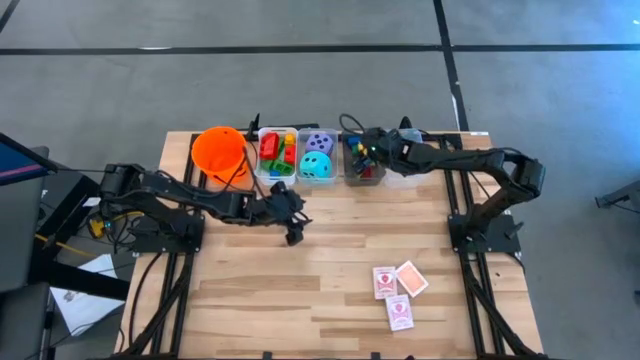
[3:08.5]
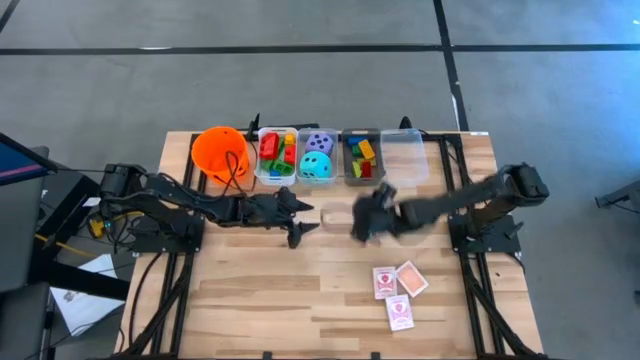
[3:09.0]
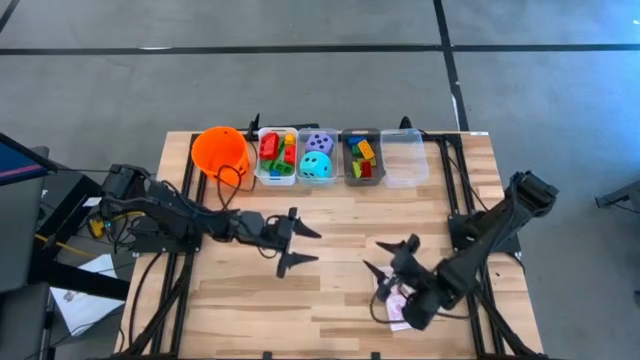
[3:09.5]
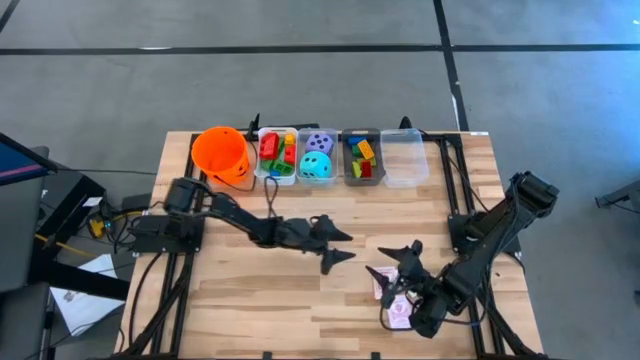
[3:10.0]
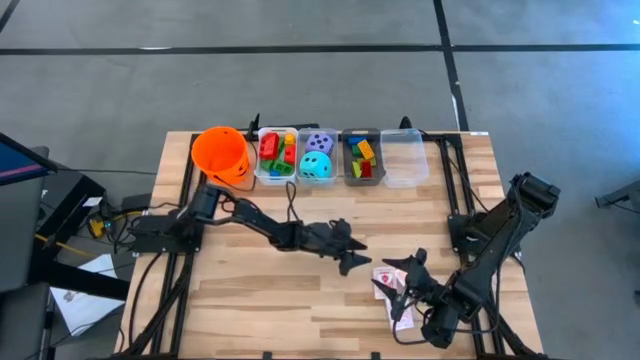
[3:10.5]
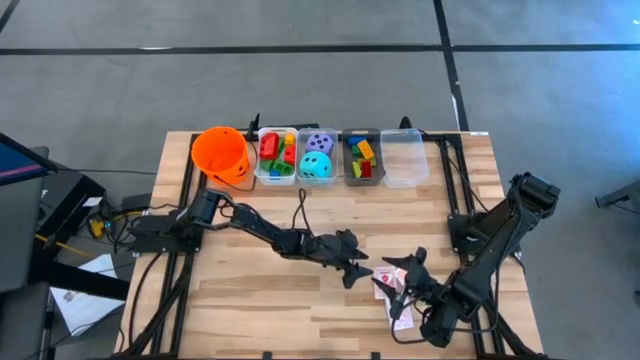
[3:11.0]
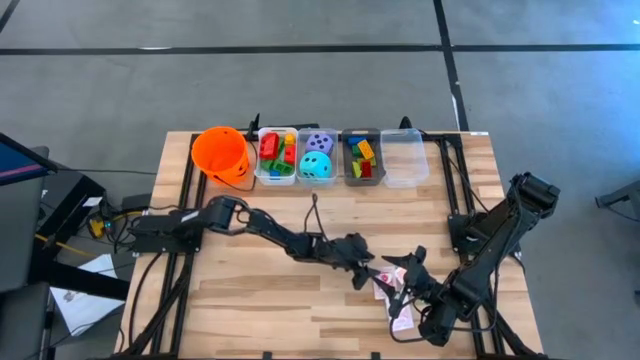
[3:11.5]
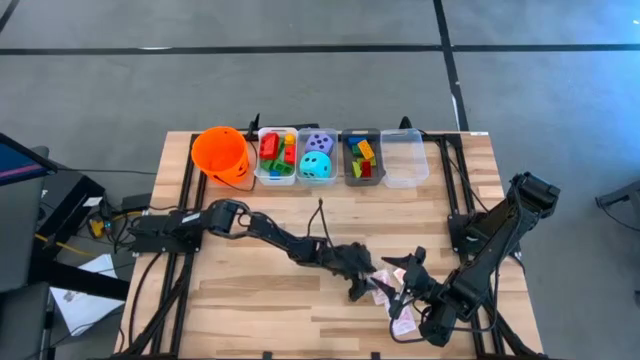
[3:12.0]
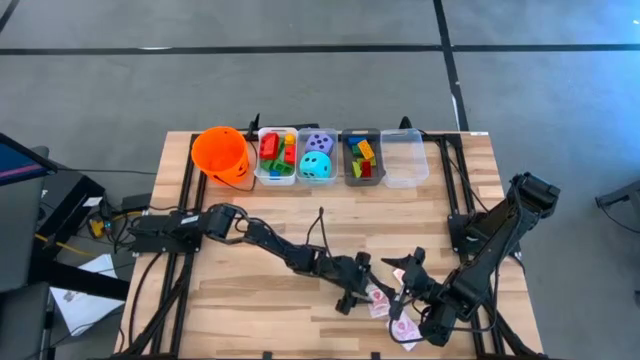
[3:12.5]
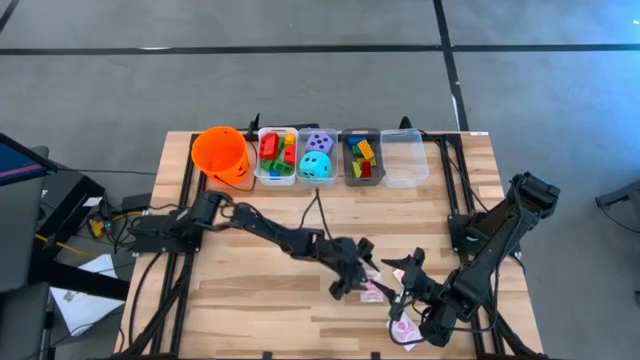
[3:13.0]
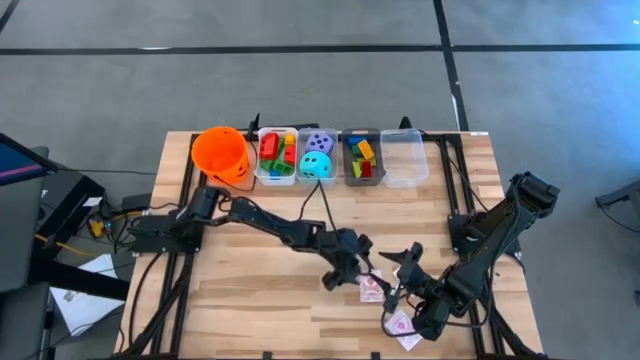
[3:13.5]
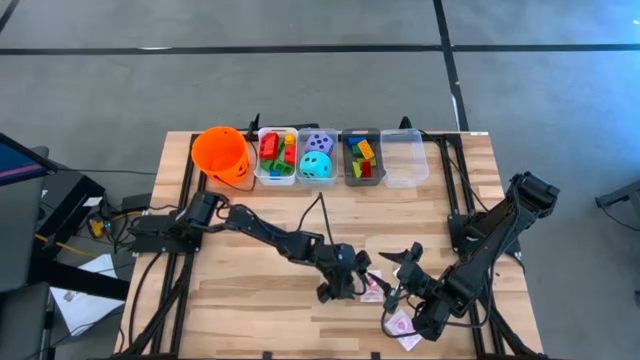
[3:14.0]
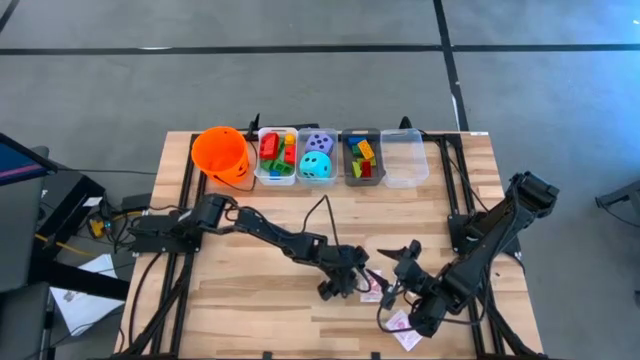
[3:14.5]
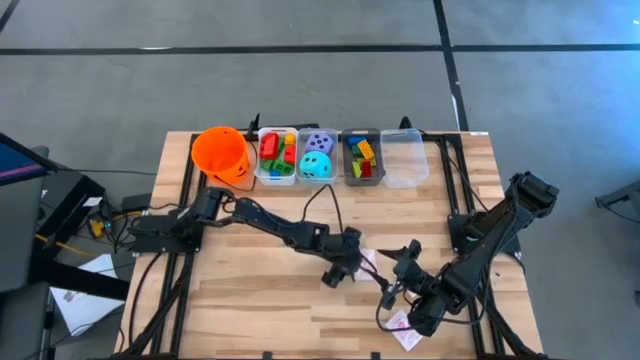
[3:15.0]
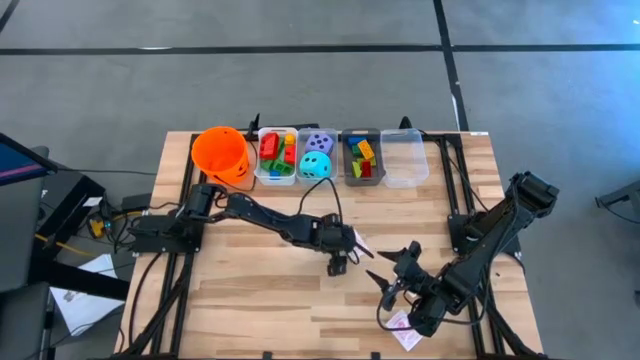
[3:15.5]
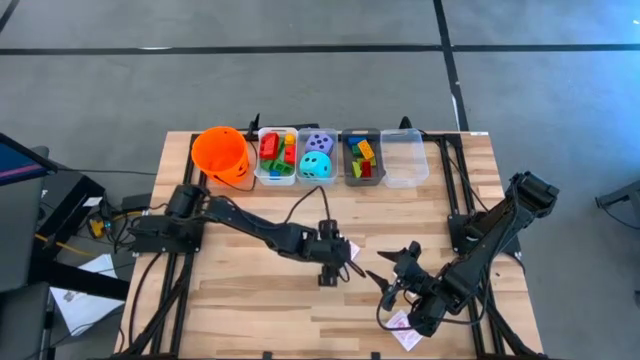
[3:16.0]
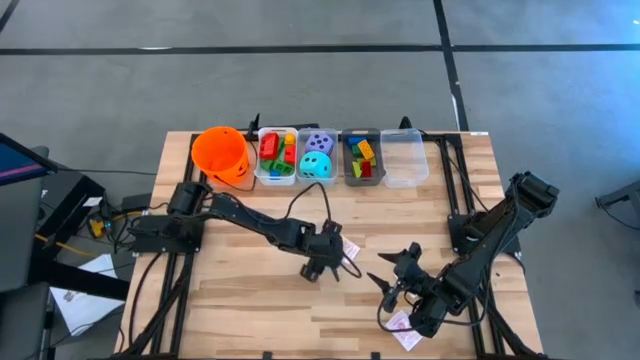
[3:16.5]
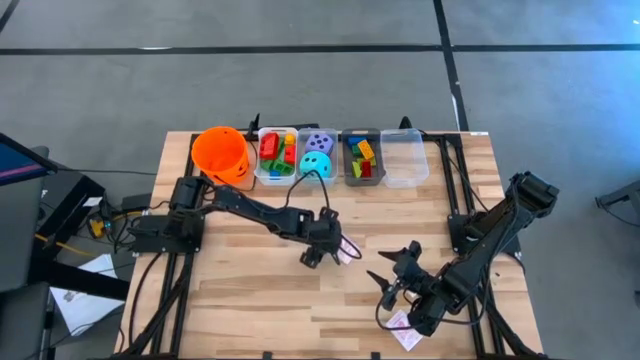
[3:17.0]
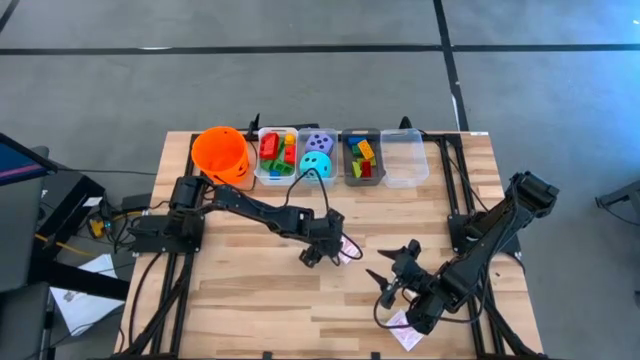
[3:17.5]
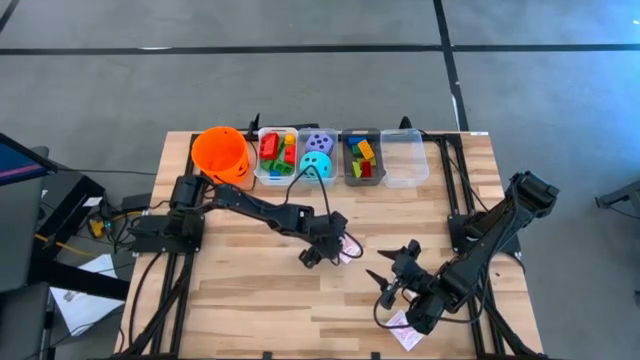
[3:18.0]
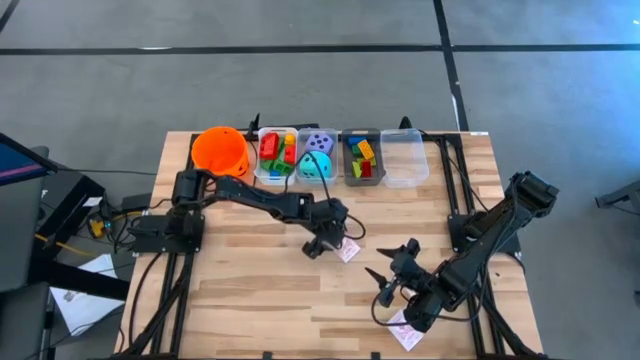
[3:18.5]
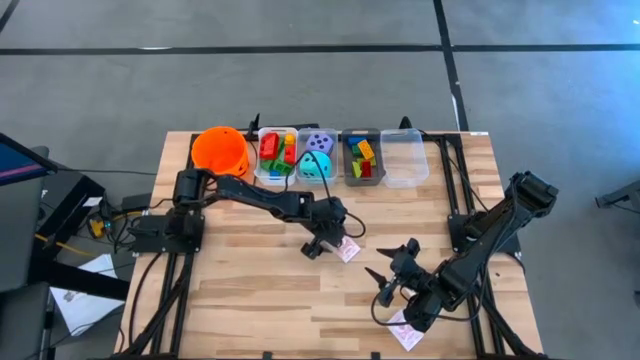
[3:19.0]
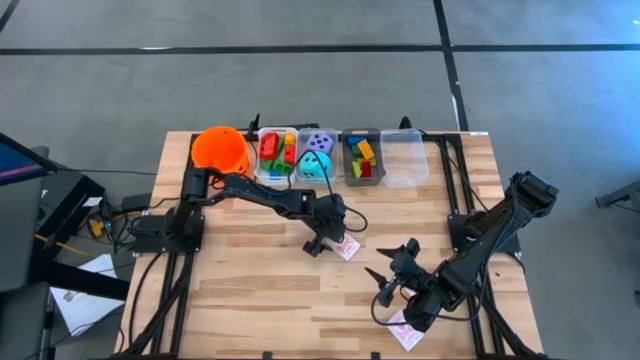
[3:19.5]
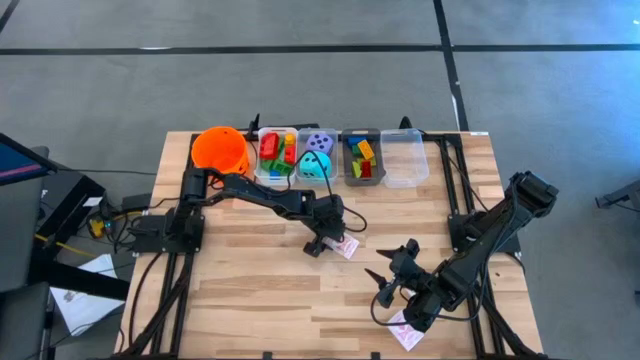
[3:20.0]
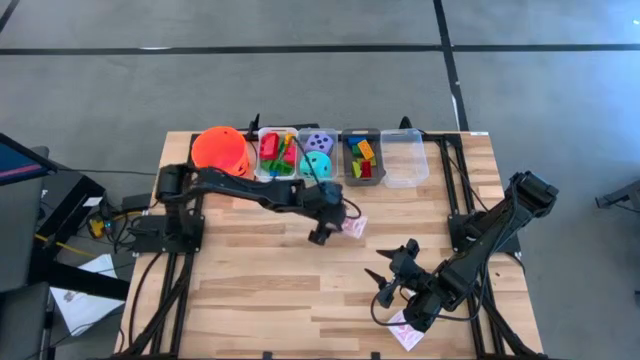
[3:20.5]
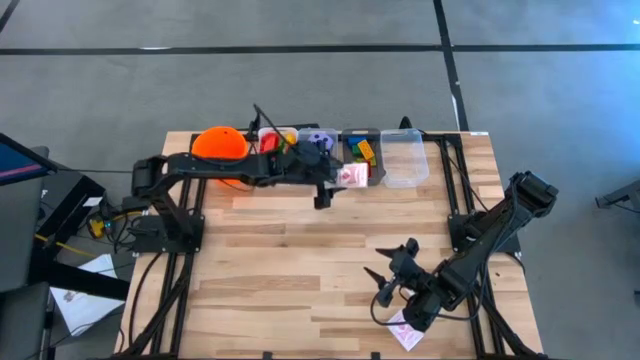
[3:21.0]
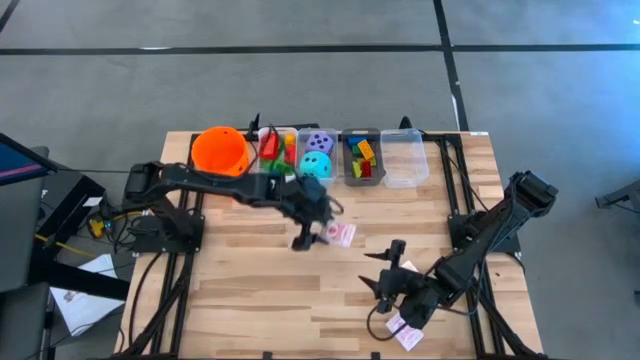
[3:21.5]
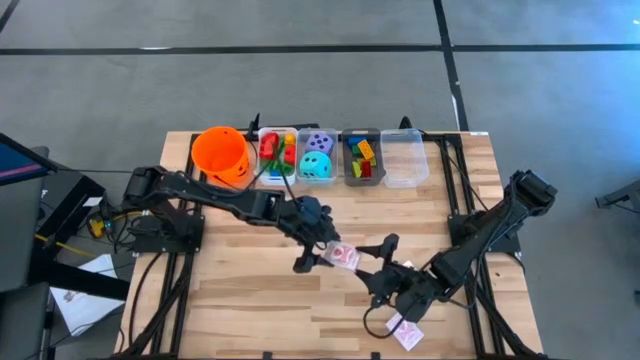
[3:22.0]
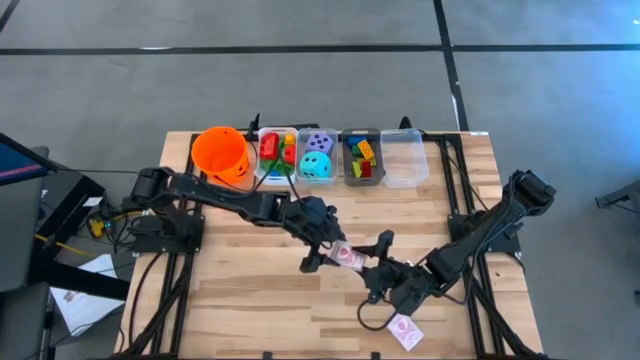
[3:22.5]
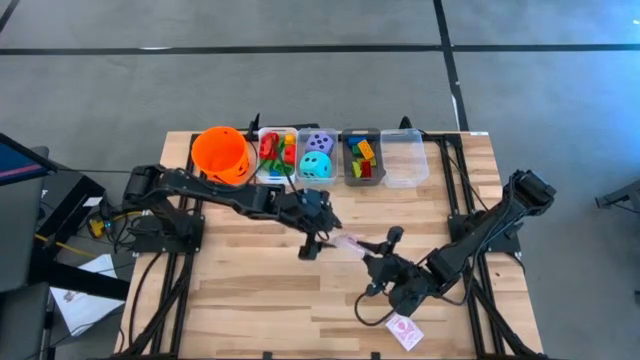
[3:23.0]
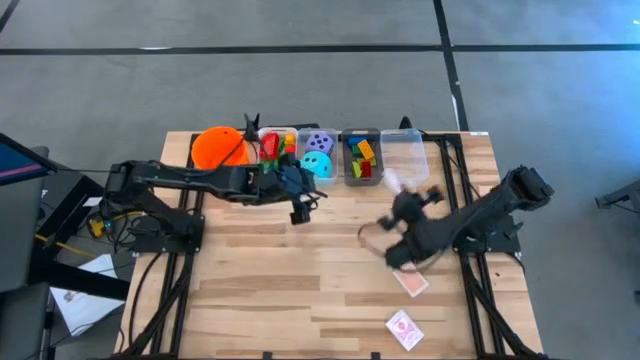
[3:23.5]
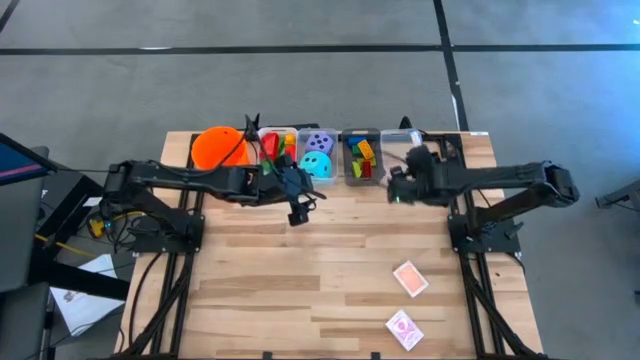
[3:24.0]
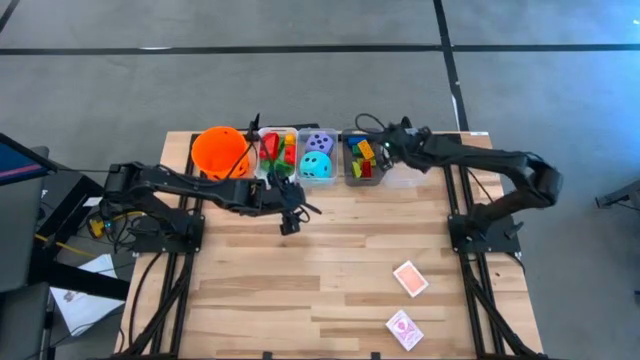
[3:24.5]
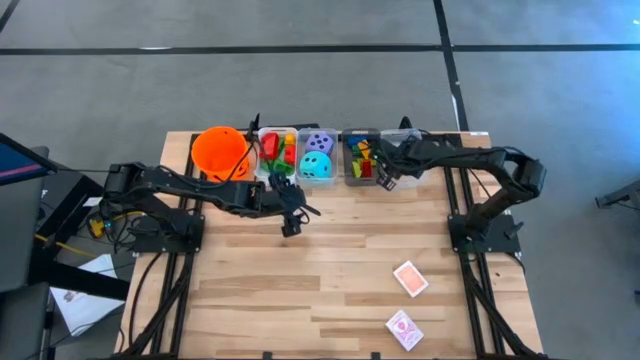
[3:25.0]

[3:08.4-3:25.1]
Task: Pick & Place Toys
Put the top red deck of cards into the right transparent bin

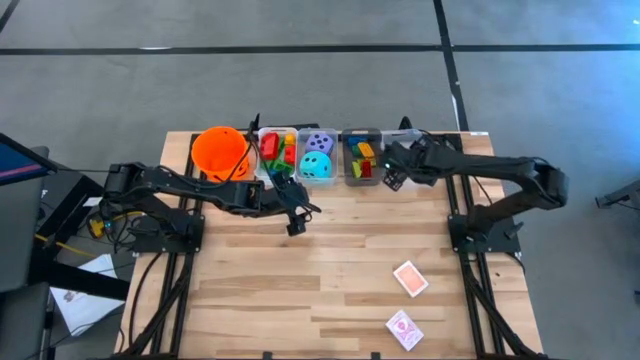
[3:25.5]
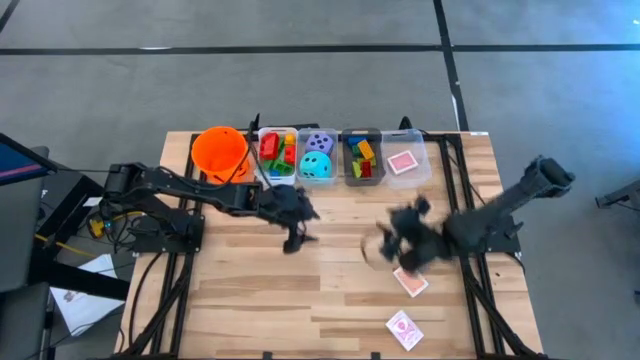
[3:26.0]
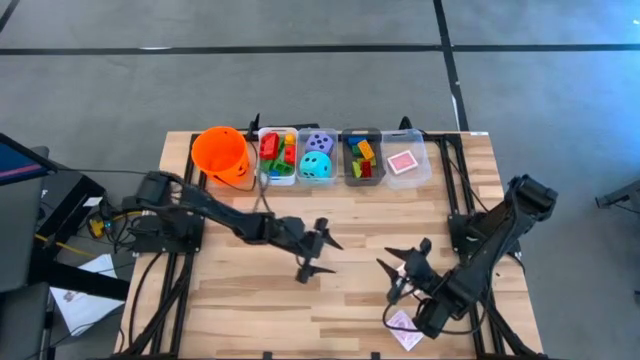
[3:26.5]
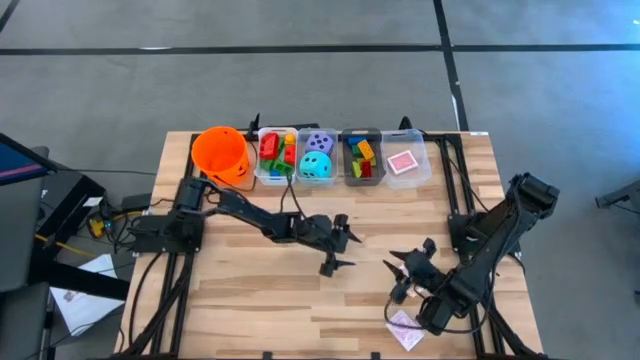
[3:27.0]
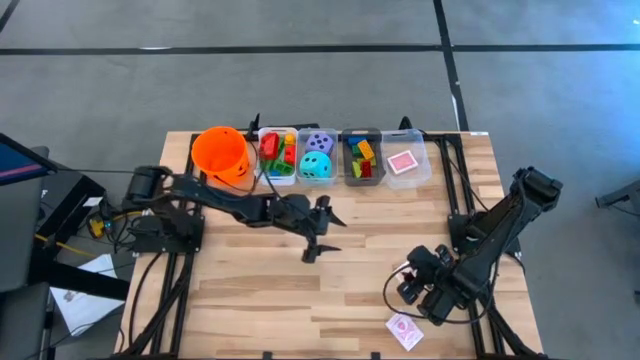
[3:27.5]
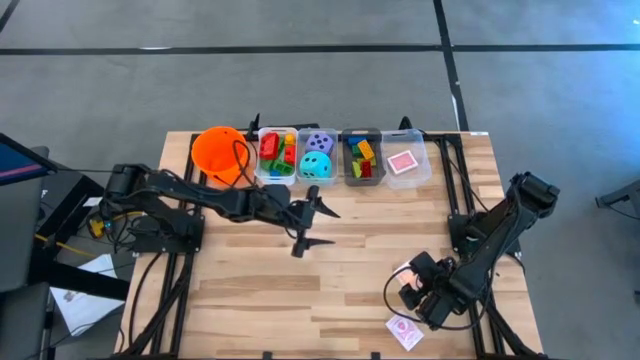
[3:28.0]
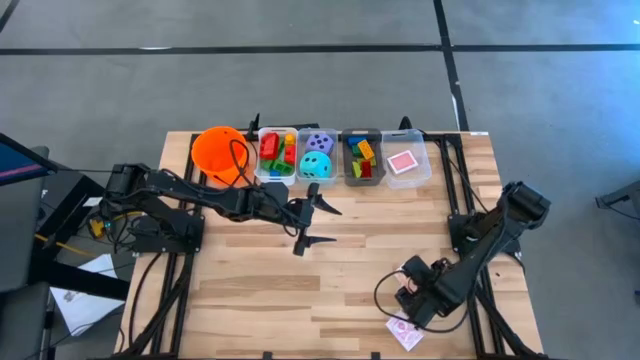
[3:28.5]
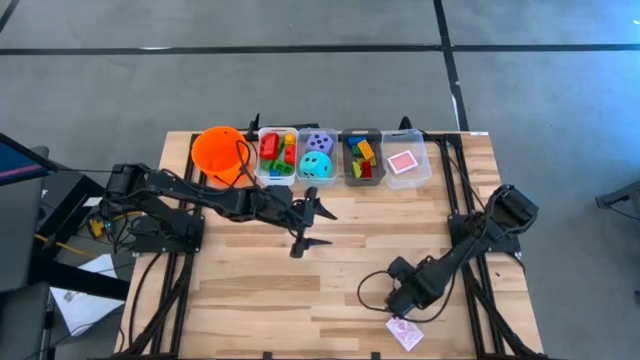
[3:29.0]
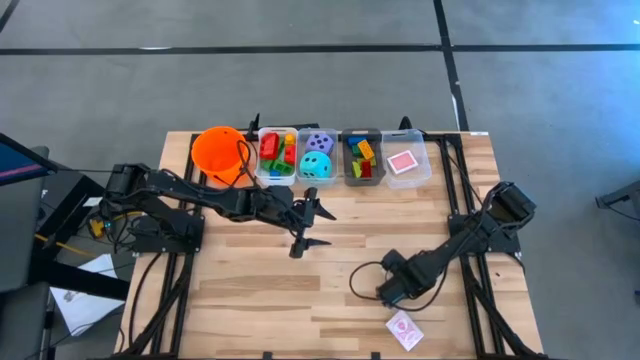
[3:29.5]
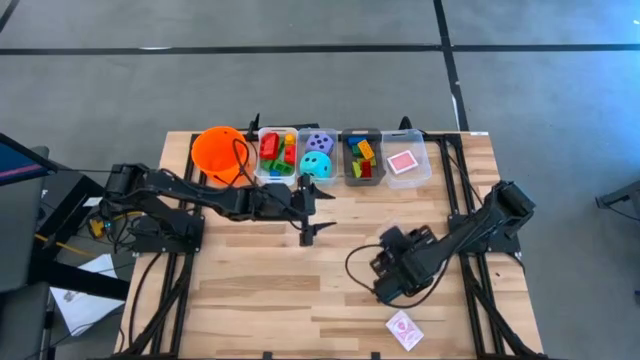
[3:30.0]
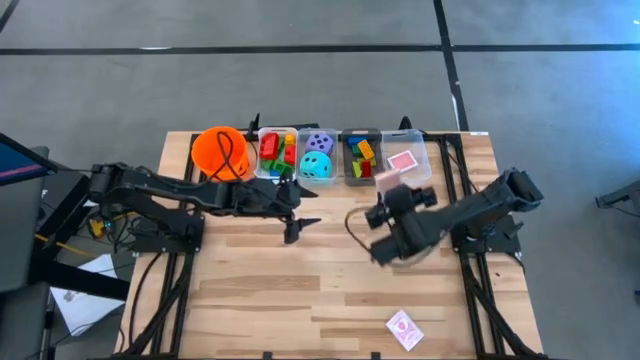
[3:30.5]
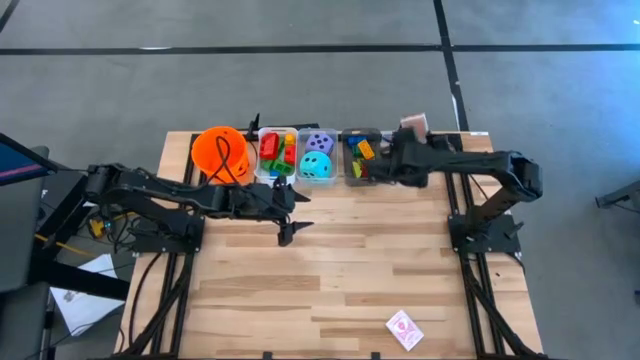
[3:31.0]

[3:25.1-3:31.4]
Put the orange deck of cards into the right transparent bin
